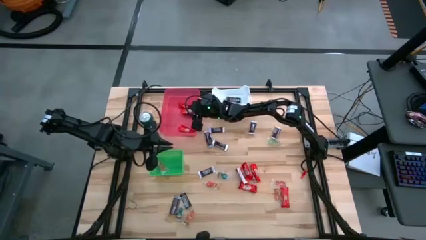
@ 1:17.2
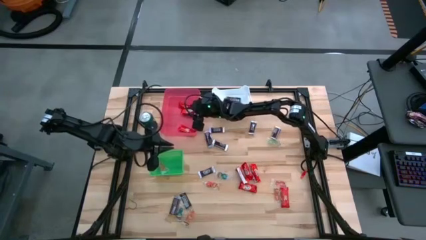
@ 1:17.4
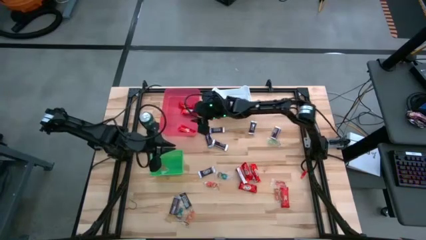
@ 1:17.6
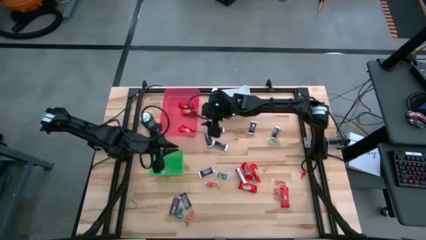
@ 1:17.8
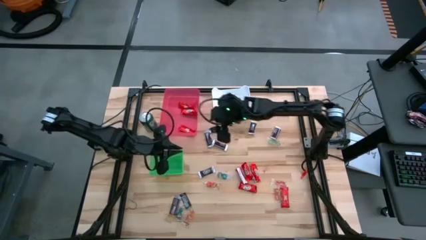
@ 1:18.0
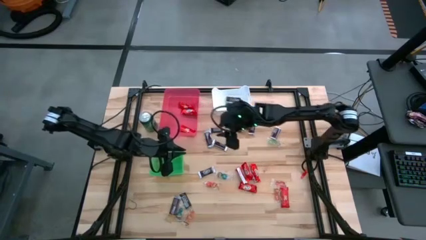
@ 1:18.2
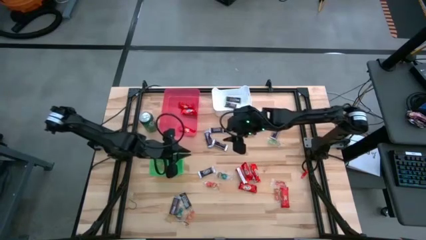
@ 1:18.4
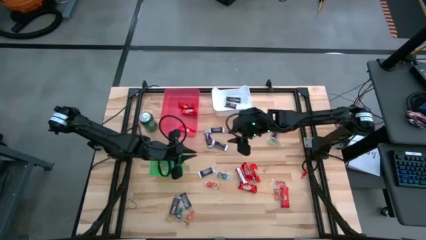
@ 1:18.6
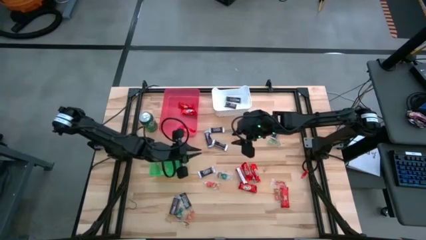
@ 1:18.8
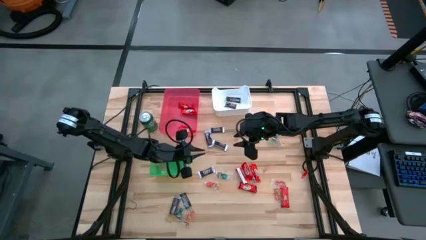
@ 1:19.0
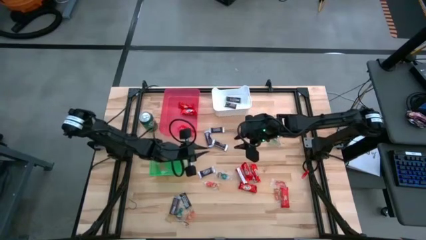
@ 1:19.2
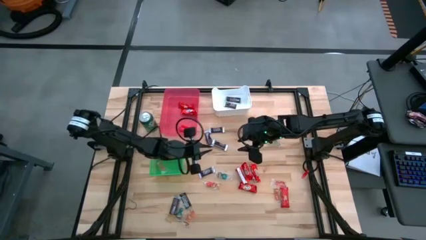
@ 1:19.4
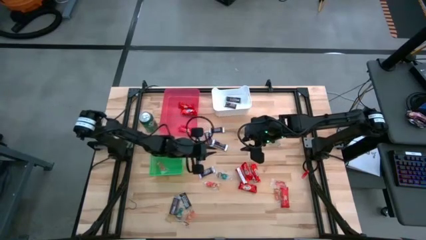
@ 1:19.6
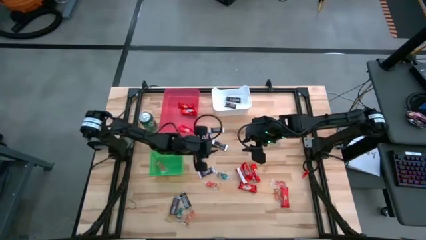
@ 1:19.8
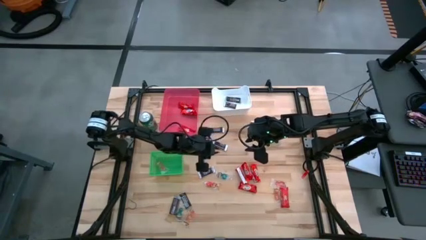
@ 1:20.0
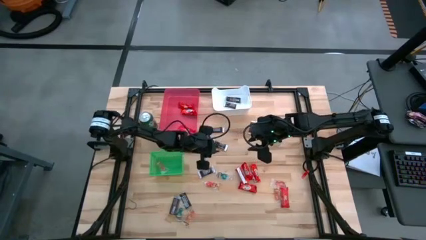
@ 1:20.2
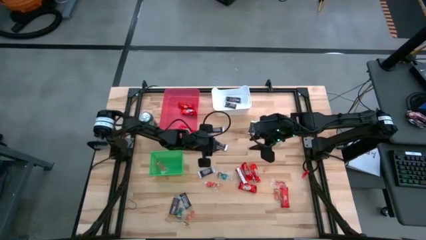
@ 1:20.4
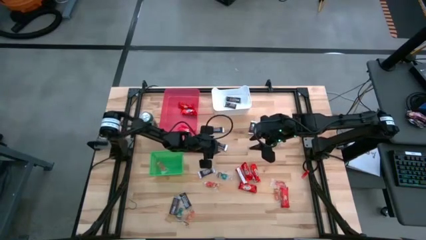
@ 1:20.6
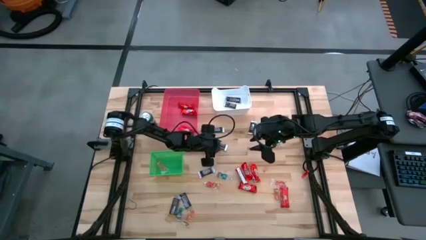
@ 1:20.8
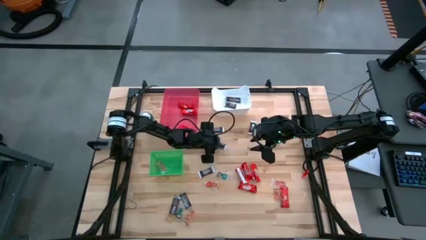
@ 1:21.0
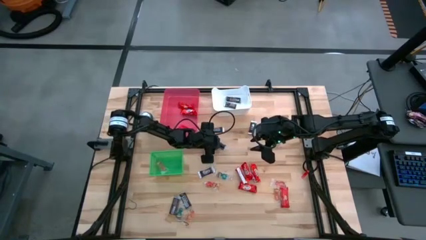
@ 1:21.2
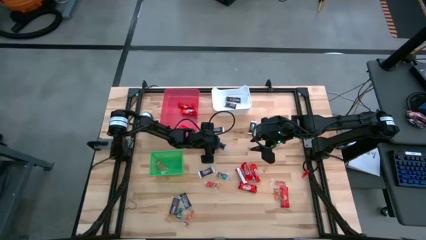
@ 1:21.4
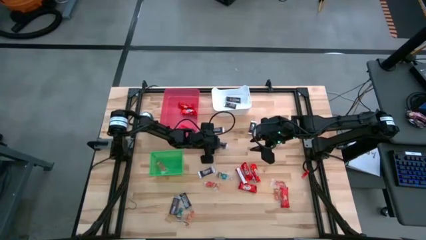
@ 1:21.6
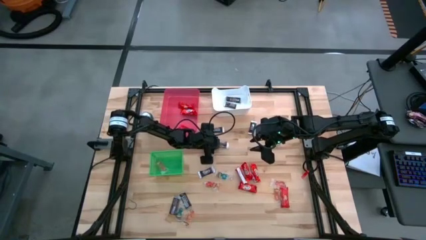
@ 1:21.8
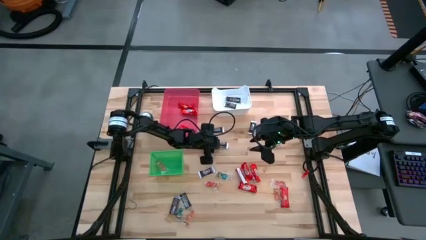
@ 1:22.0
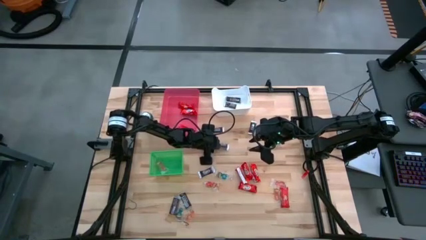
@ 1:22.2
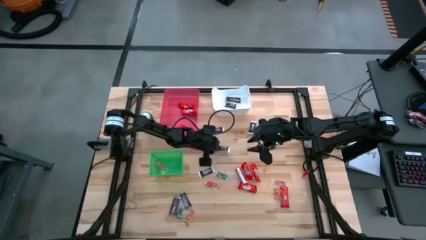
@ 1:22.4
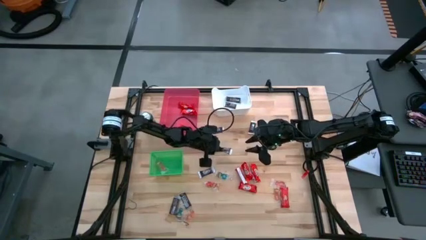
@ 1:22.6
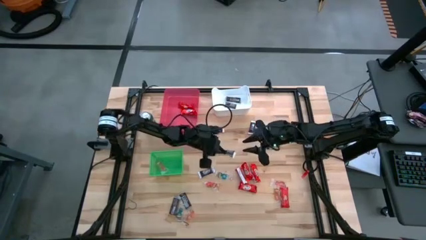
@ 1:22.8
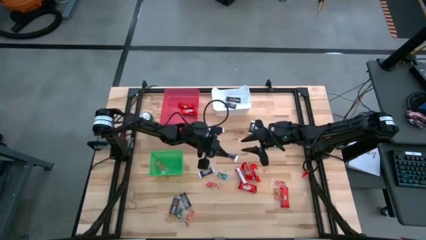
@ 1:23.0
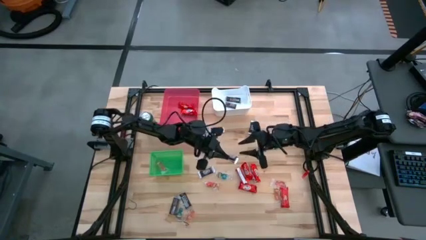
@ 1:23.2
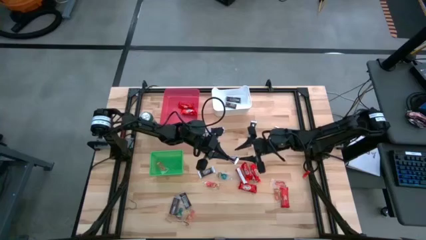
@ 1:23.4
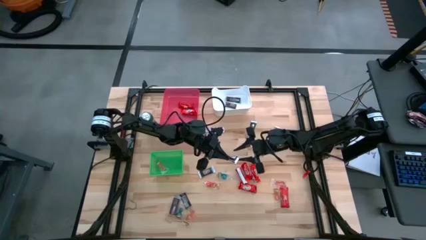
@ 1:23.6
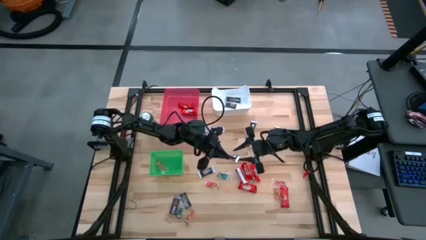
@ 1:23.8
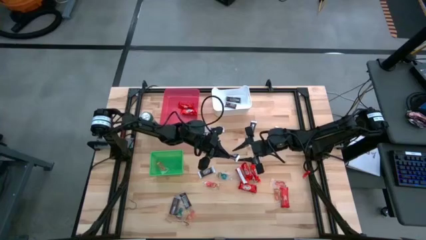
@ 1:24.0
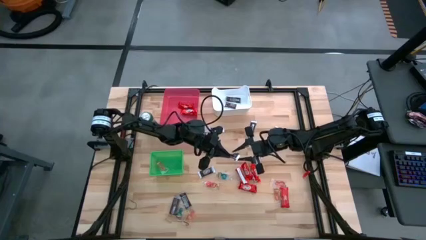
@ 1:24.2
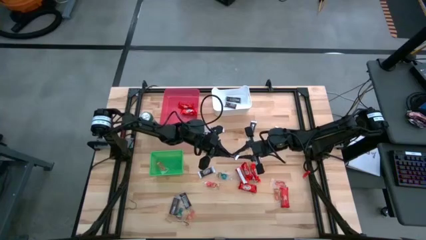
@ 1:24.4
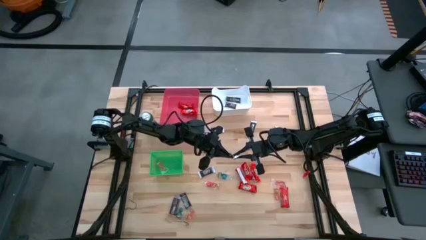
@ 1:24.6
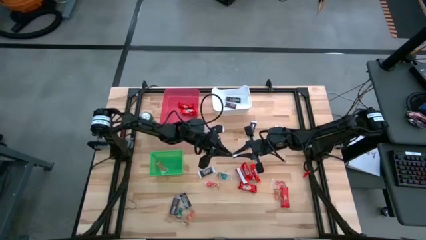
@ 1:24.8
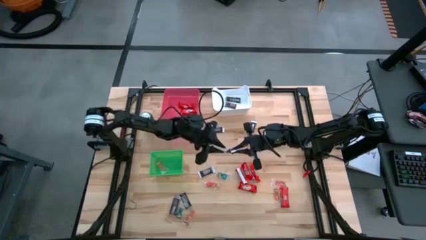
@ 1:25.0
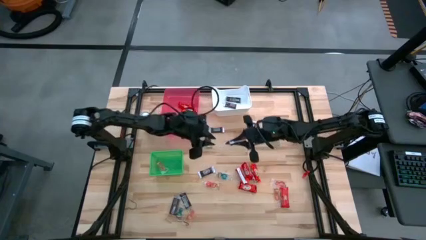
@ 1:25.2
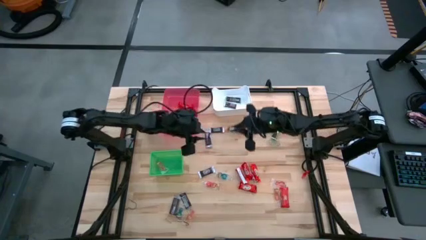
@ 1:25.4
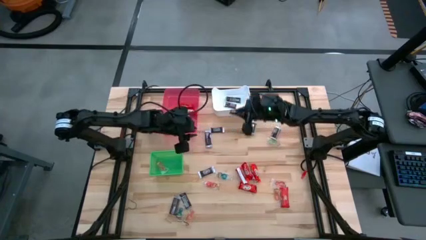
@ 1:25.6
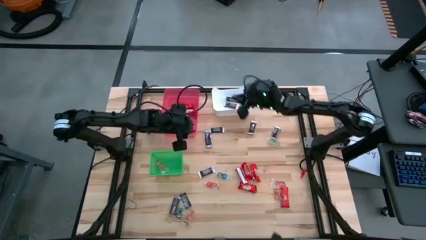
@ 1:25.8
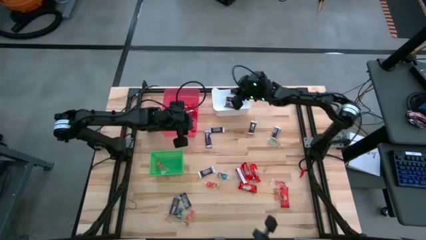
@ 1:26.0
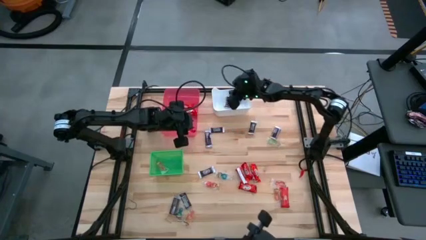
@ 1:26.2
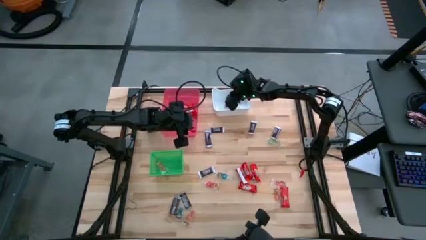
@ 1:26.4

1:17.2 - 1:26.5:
Task: Organize candy in baskets
Put the brown chocolate into the white bin

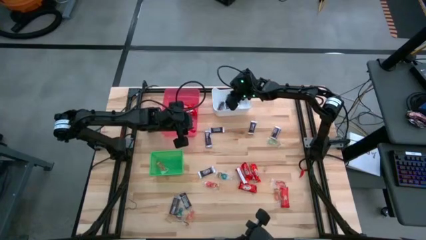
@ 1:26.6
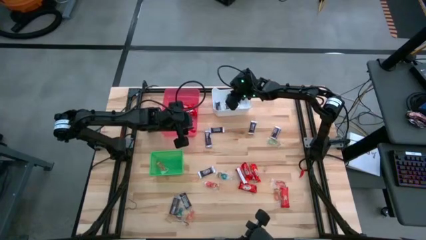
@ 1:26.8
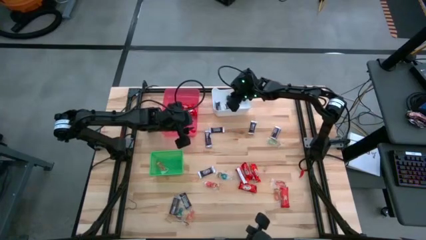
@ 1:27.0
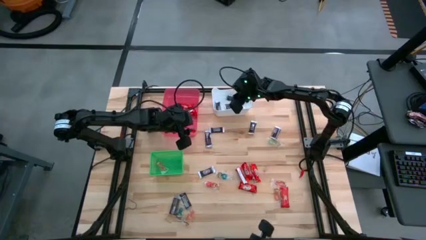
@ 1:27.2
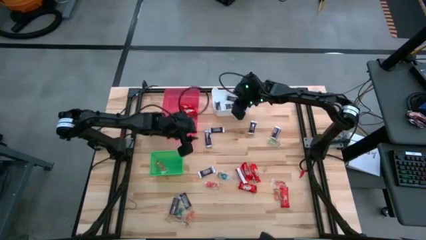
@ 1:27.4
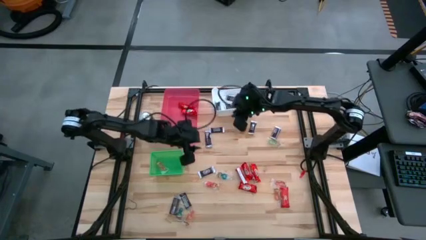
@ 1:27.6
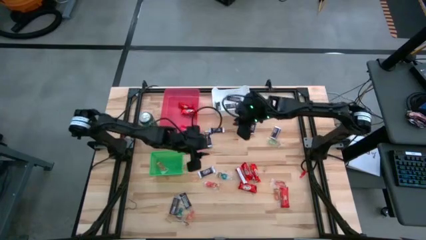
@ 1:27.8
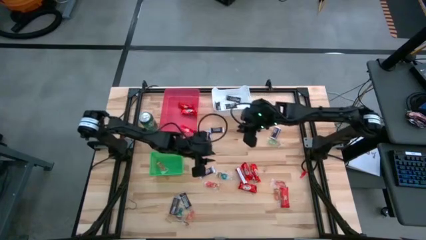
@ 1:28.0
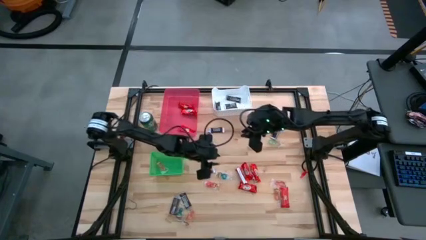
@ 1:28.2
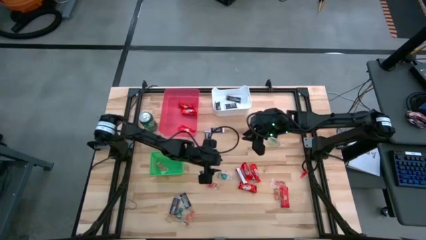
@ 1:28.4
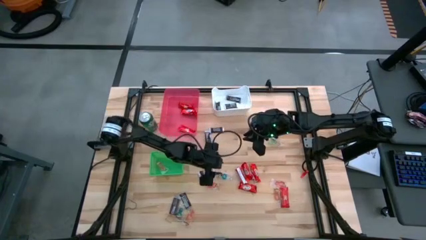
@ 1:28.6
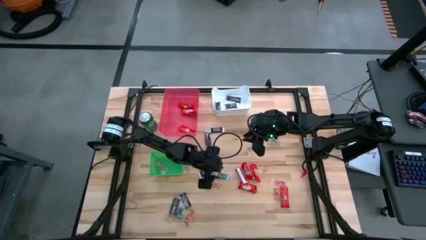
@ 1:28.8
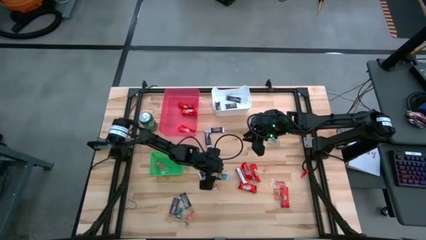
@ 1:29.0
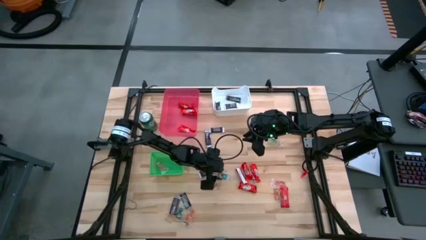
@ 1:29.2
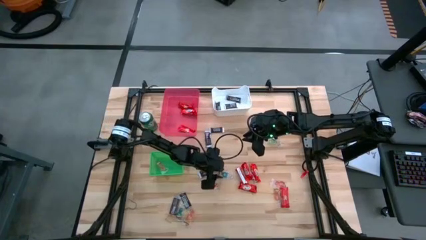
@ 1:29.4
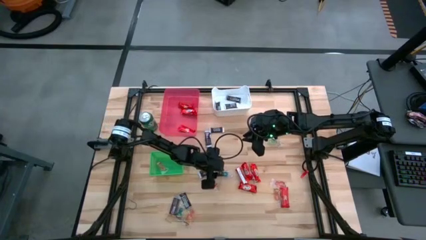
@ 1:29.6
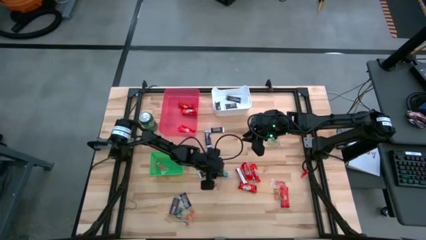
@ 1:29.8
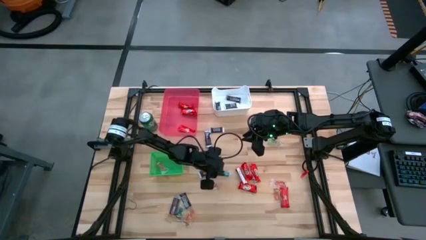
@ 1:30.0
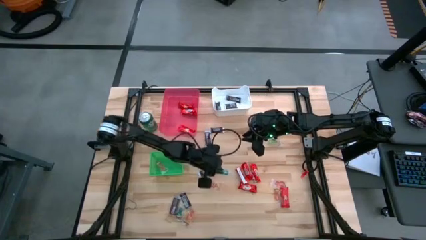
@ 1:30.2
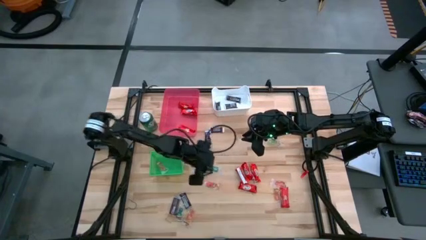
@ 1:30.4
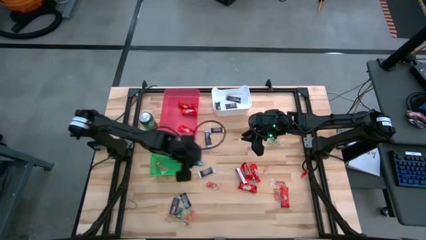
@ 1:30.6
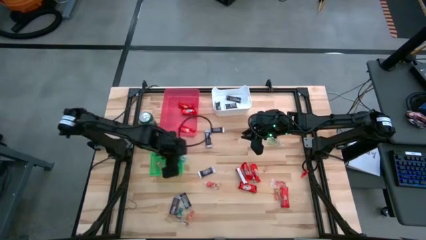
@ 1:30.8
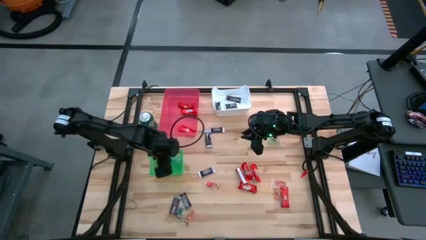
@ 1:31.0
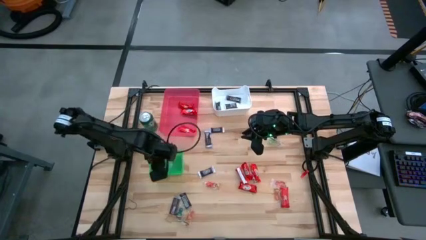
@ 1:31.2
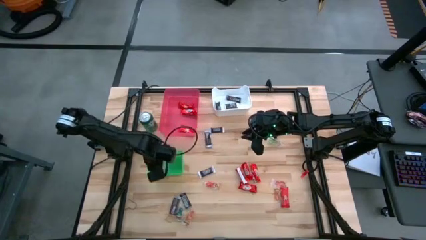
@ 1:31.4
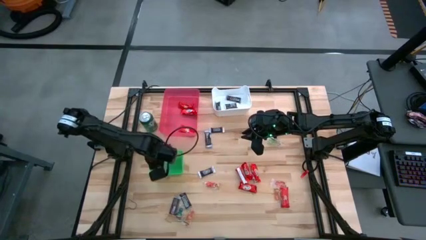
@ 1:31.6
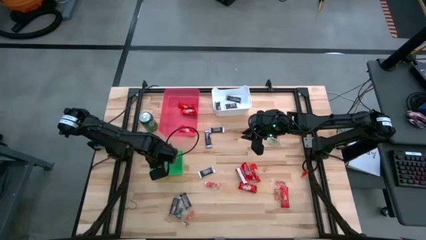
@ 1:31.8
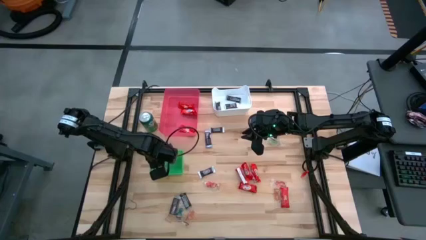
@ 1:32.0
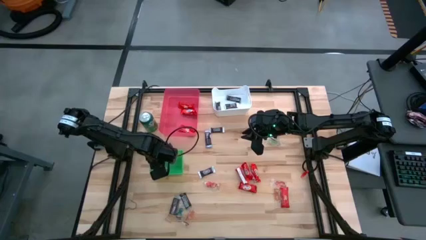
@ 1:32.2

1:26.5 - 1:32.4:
Put the blue gummy into the green bin
